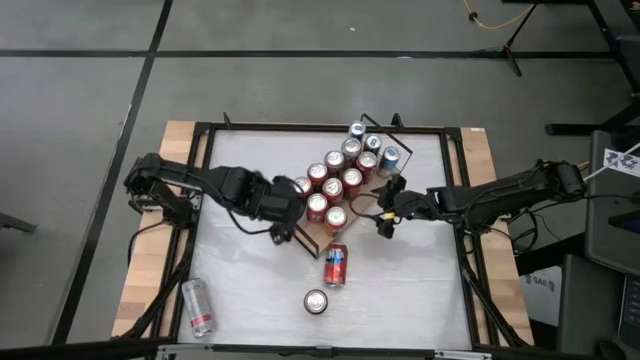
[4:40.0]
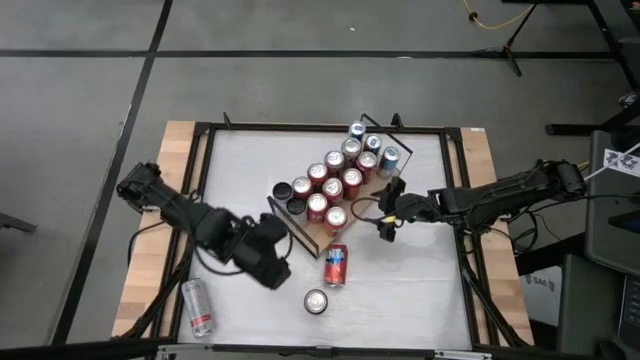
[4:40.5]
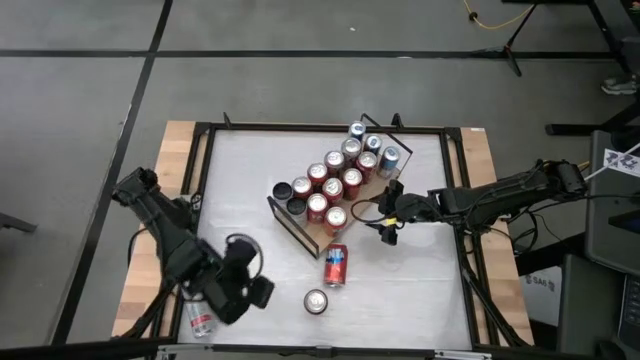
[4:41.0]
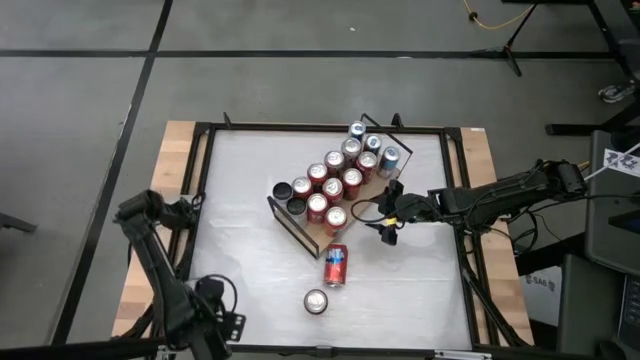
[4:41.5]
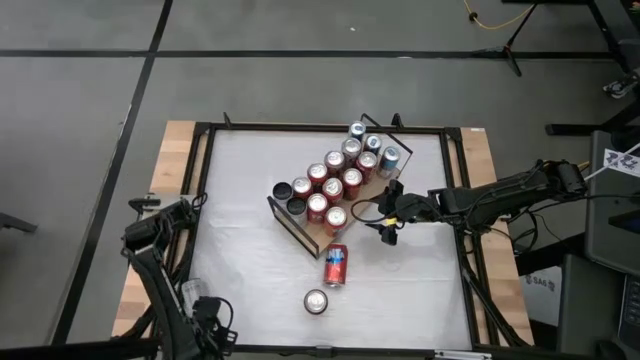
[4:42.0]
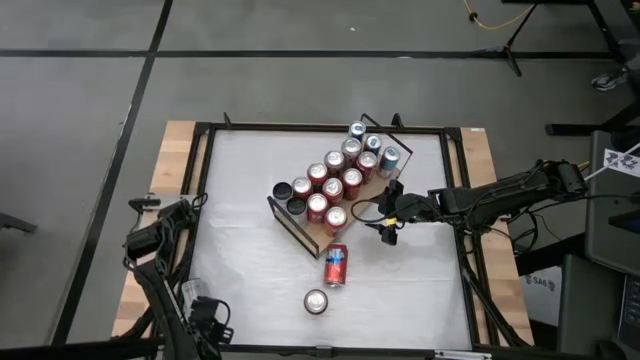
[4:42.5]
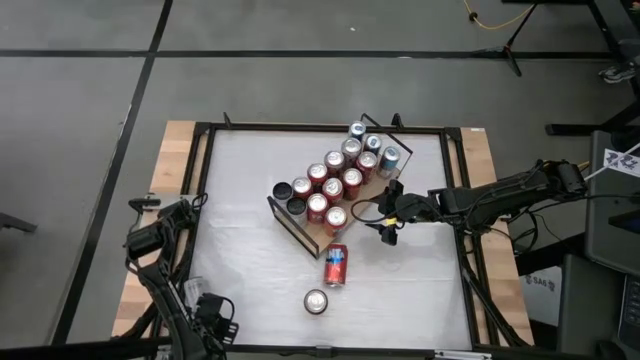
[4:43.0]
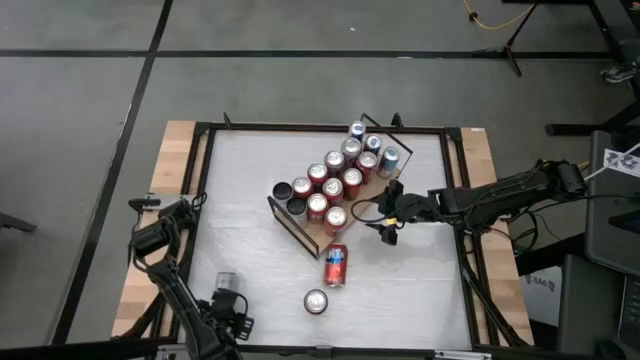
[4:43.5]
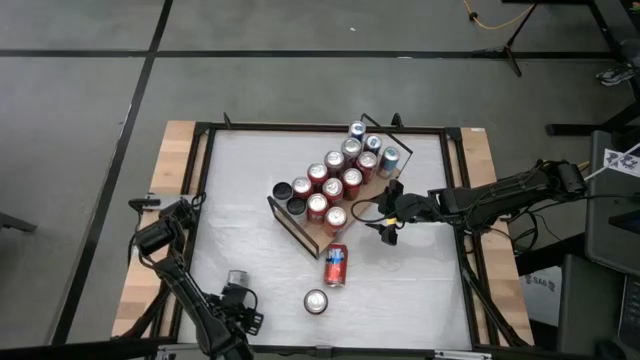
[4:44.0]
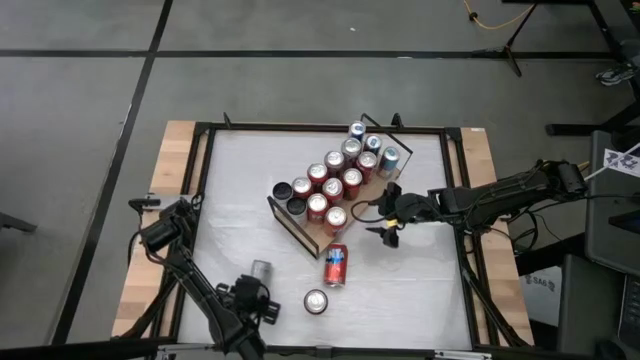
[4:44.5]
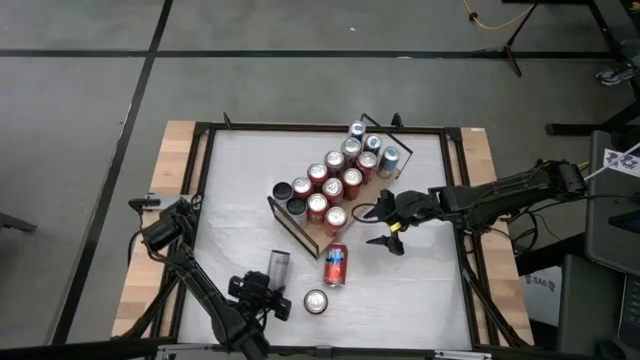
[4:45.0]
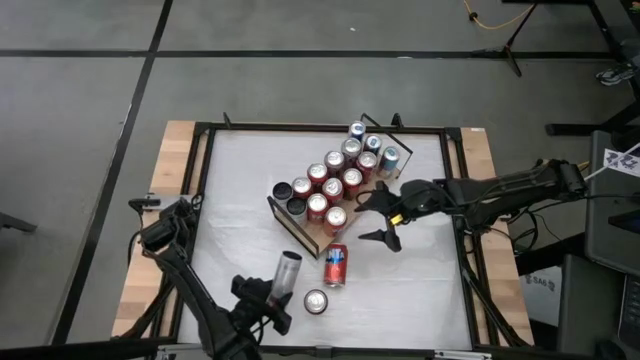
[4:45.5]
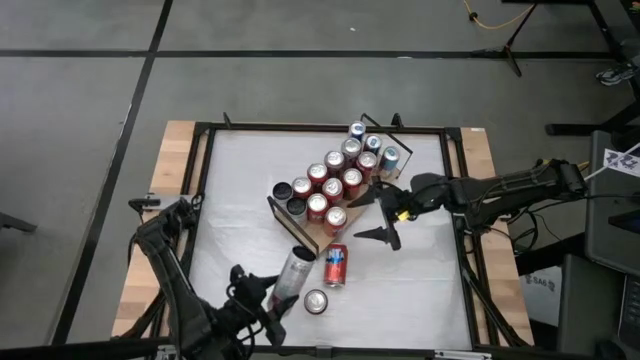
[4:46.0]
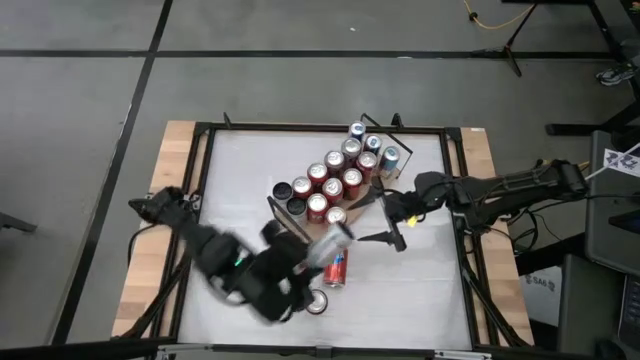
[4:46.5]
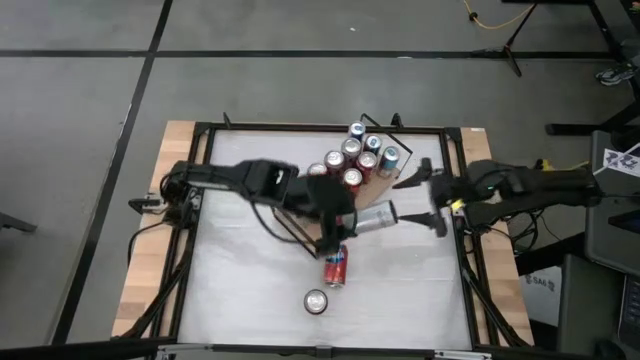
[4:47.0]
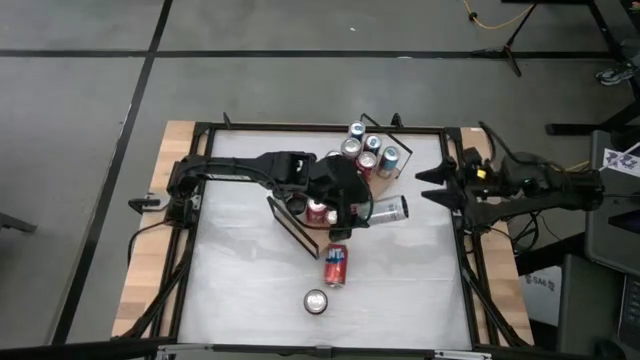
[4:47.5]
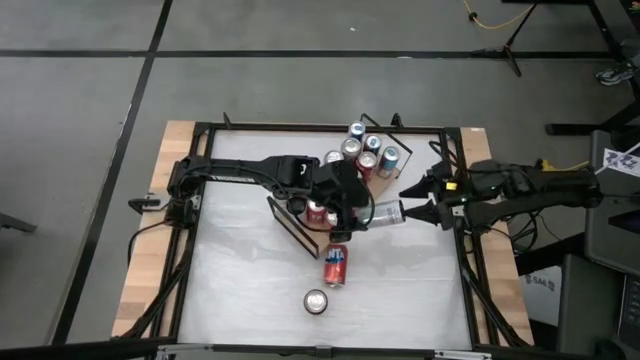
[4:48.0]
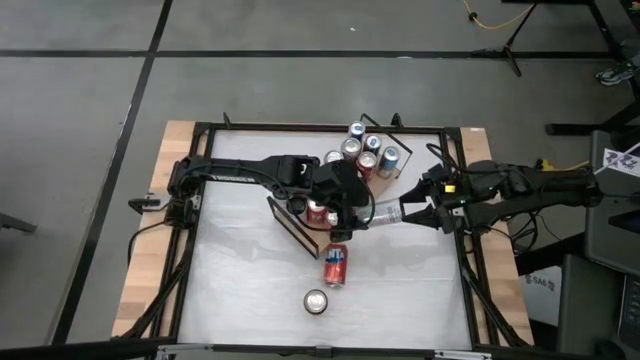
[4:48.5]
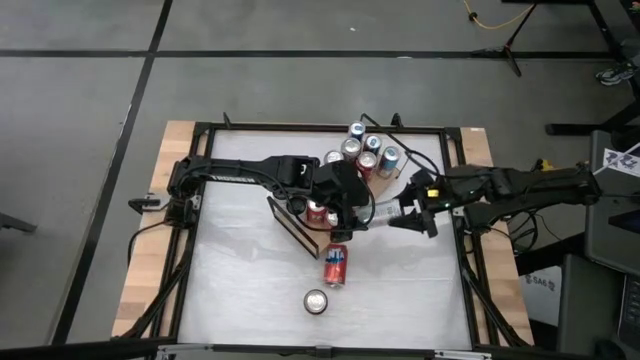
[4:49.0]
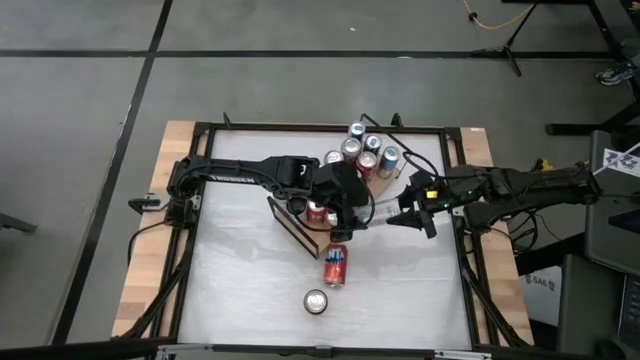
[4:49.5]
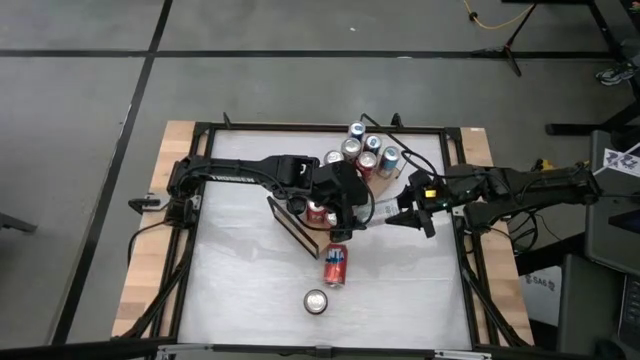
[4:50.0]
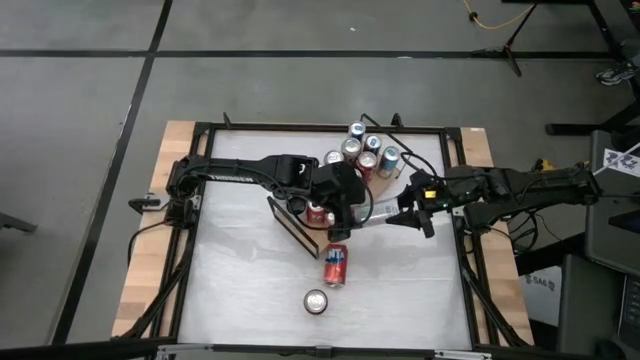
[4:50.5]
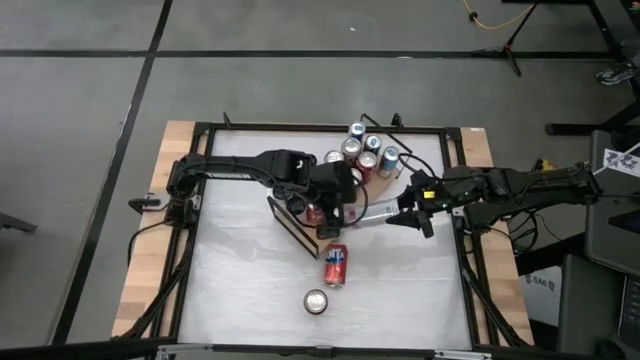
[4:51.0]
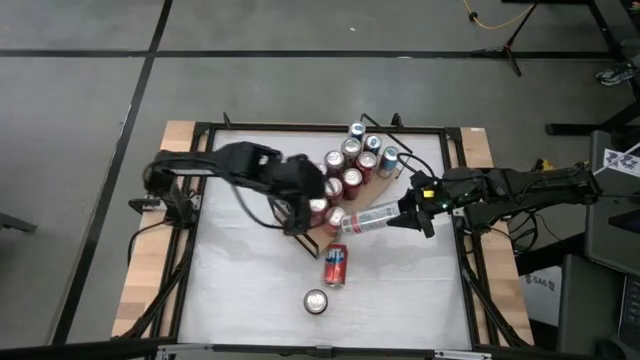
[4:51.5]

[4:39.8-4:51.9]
Task: Place canned beverage on shelf
Put the white pink soda can on the shelf aligned with the other white pink soda cans

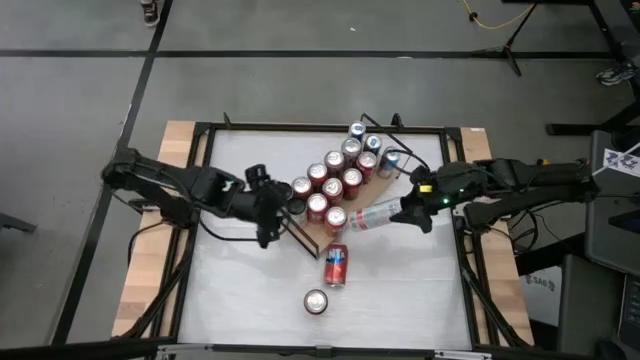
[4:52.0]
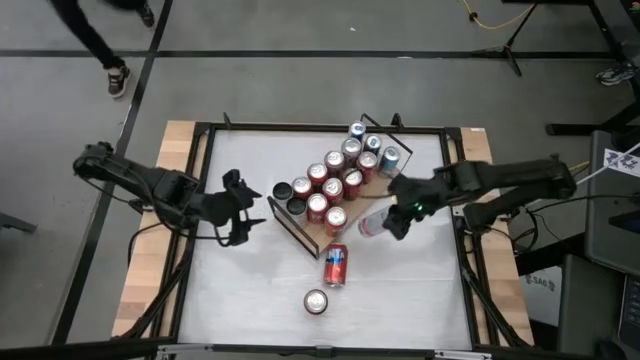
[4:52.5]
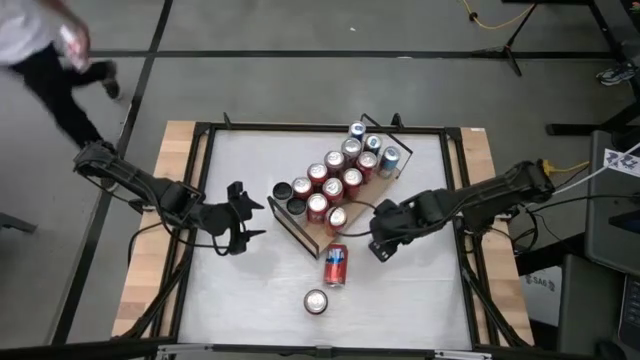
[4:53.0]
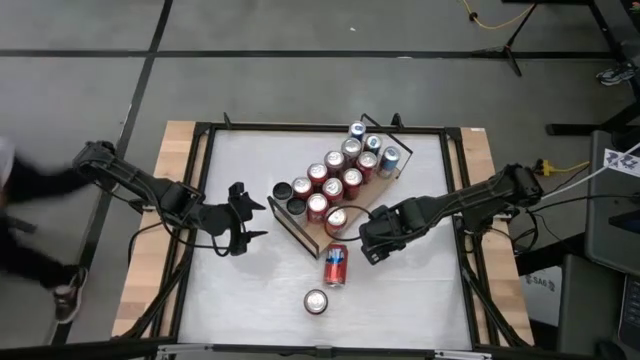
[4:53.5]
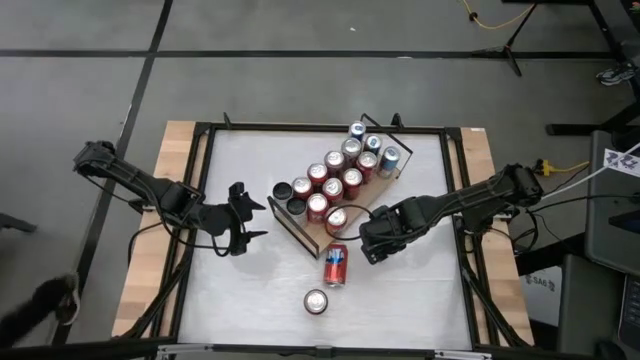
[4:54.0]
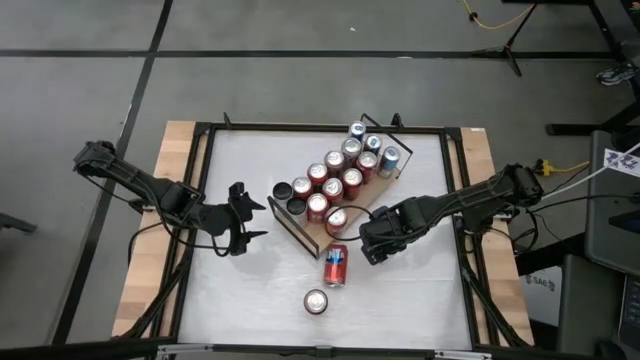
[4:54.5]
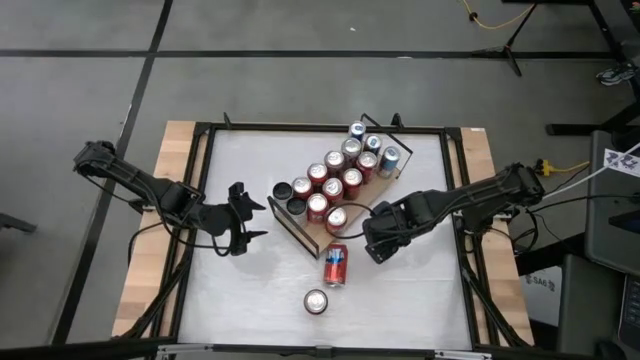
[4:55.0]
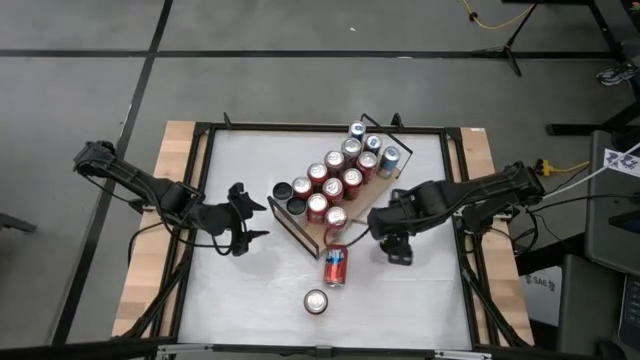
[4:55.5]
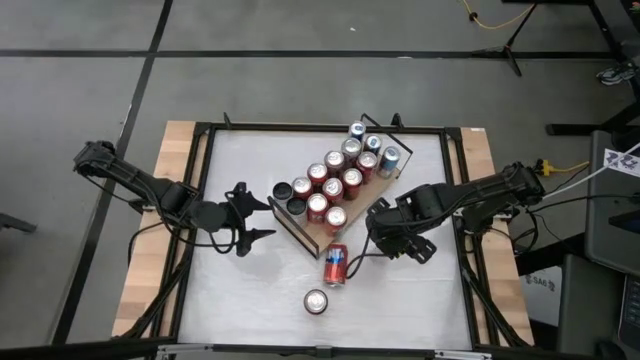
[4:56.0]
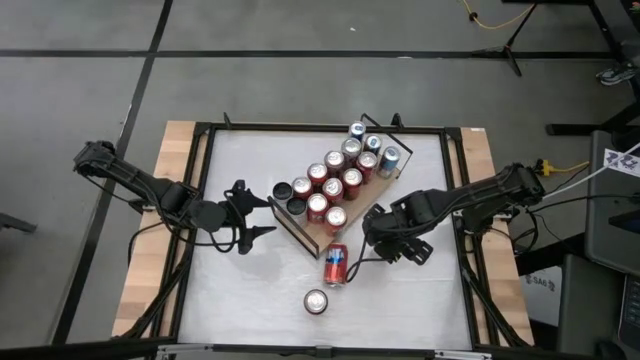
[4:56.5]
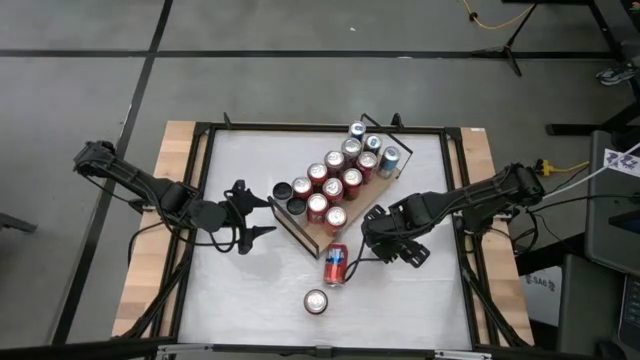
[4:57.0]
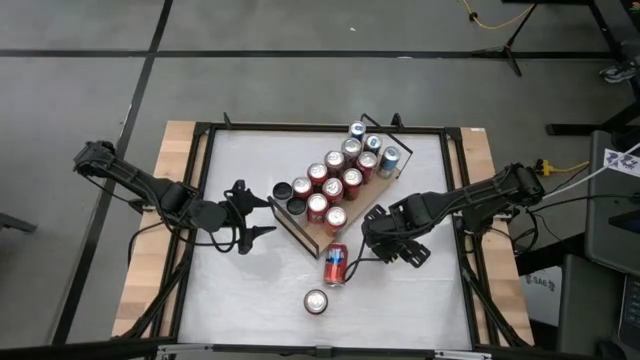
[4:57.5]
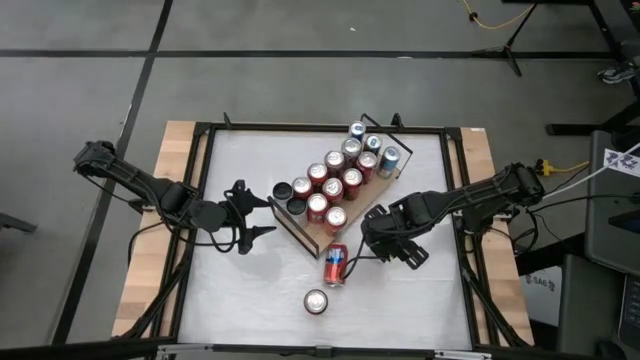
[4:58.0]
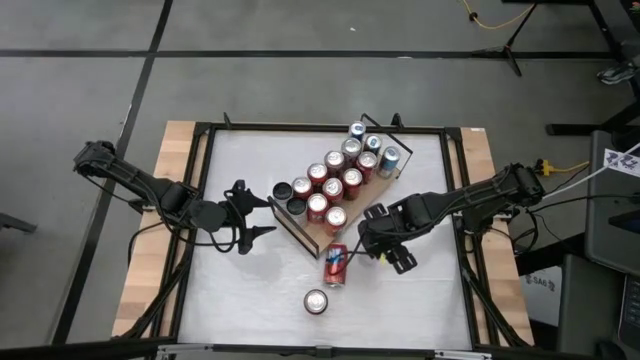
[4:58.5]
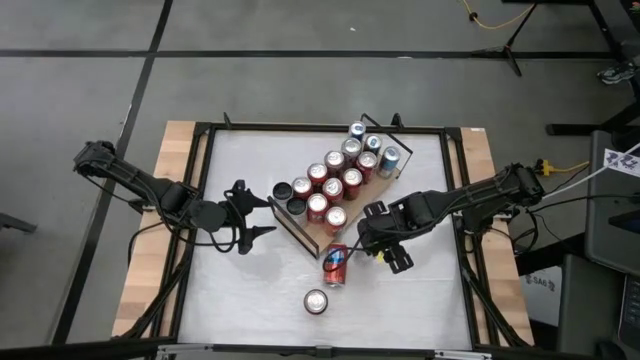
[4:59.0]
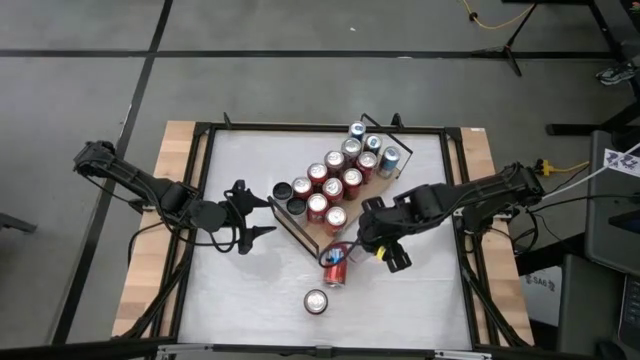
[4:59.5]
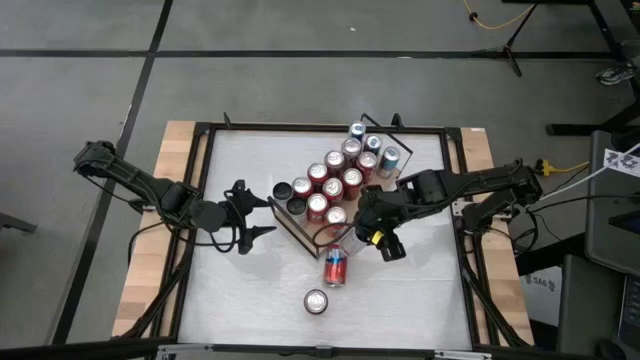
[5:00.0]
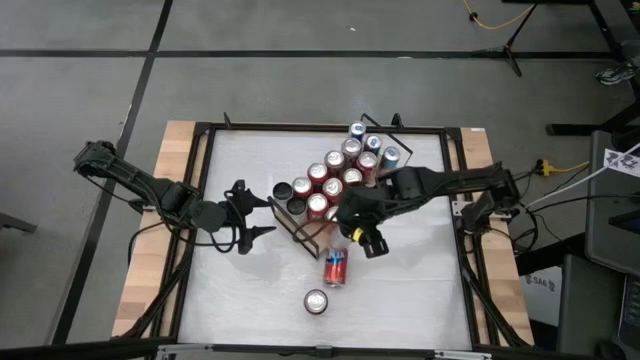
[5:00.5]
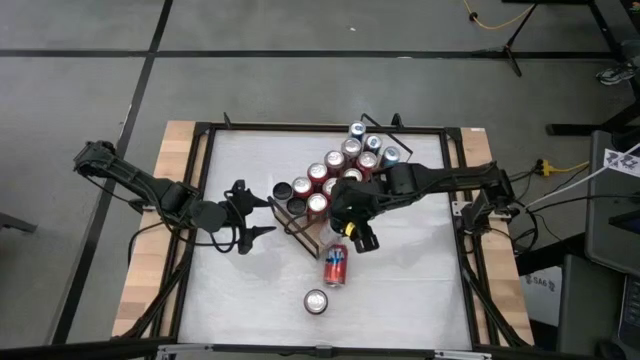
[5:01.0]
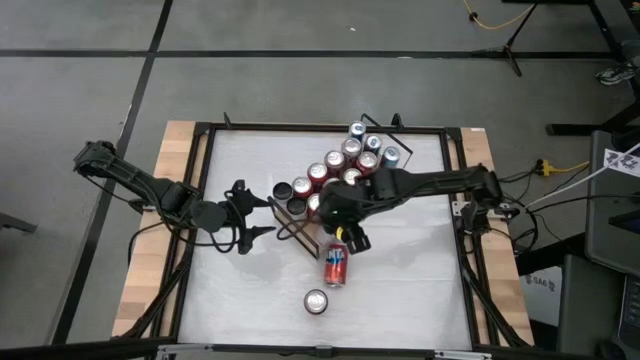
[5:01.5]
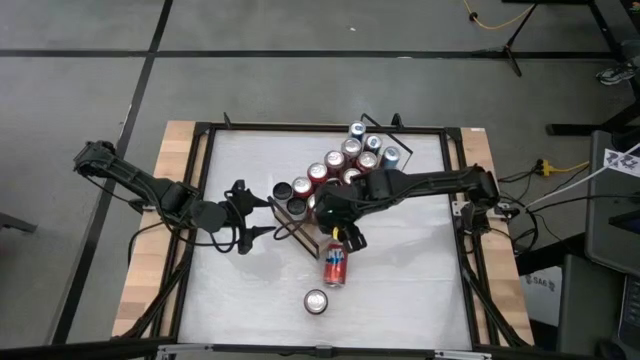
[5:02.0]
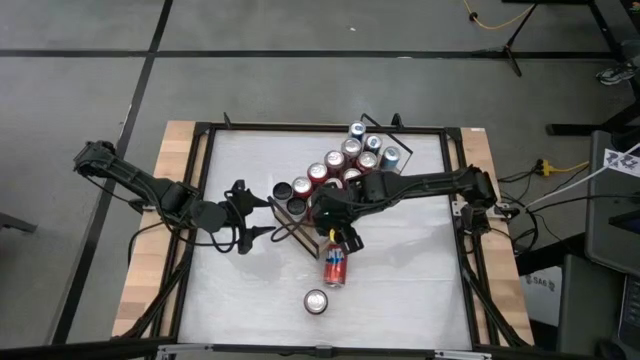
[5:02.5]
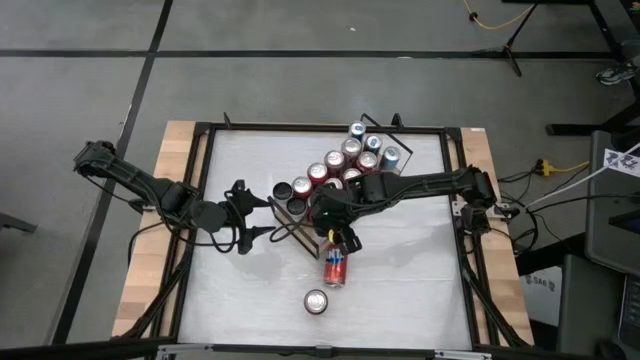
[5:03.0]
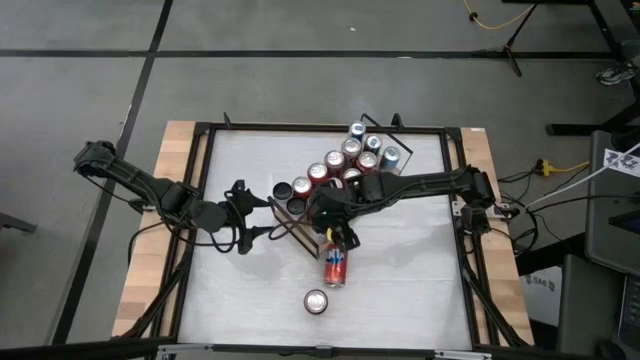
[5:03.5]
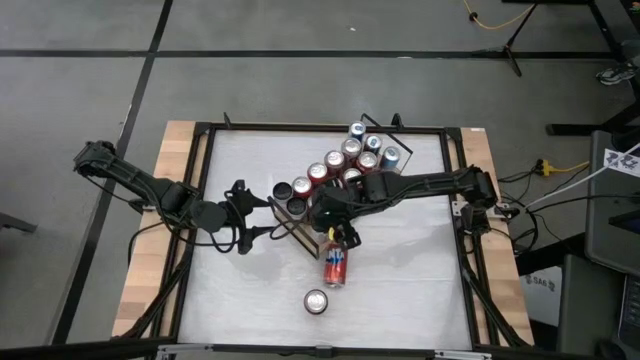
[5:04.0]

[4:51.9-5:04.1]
Put the white pink soda can on the shelf aligned with the other white pink soda cans
